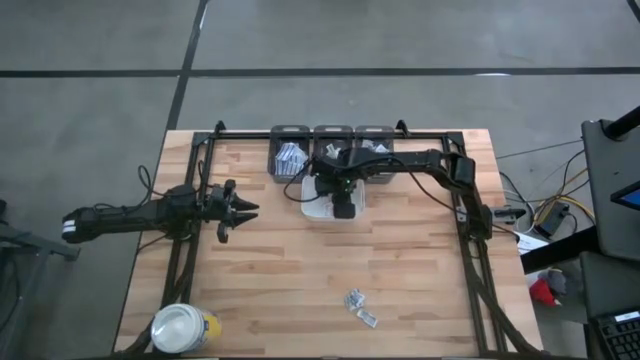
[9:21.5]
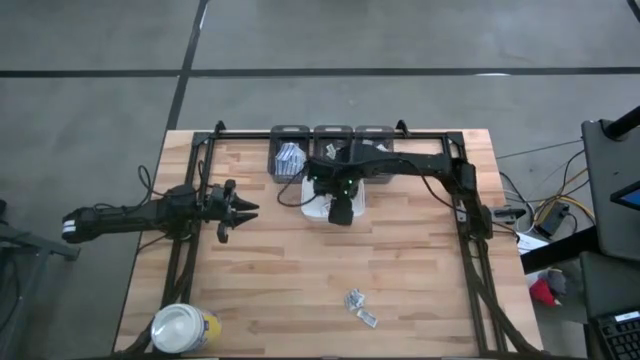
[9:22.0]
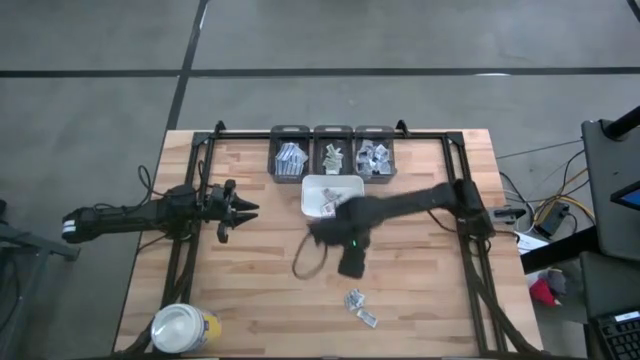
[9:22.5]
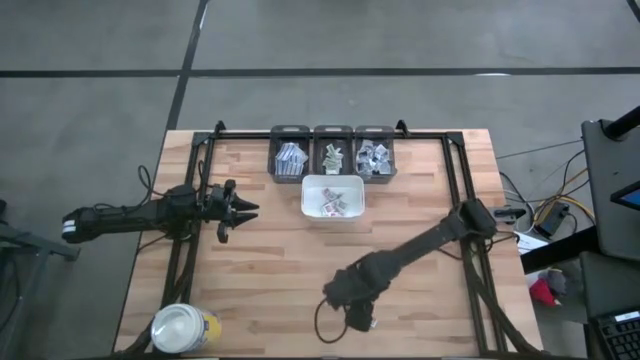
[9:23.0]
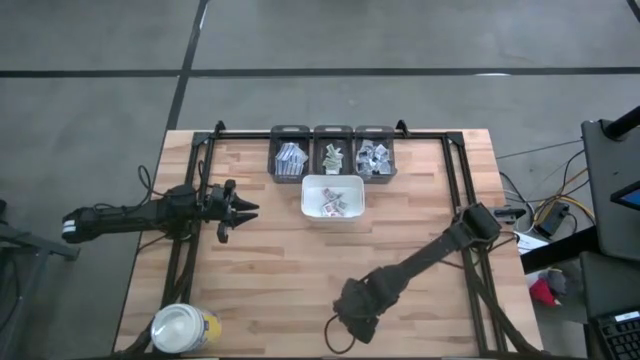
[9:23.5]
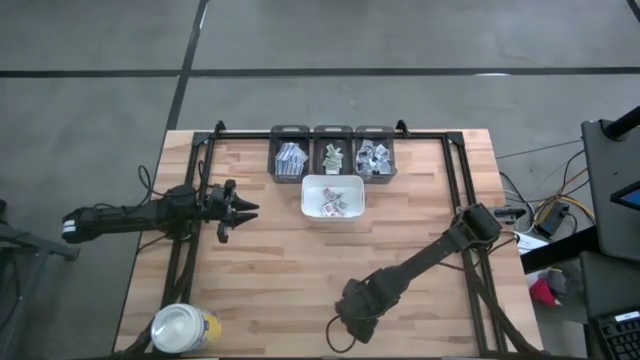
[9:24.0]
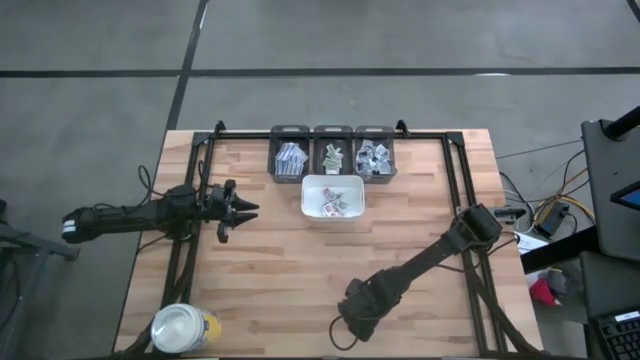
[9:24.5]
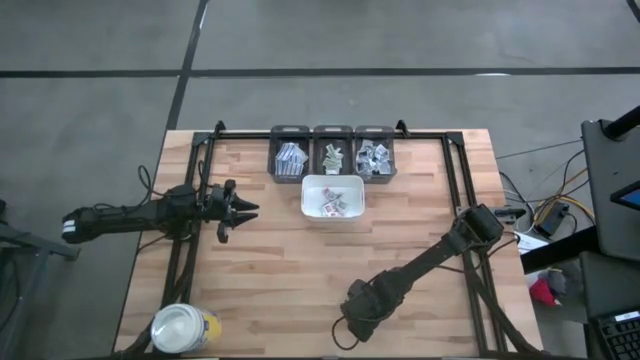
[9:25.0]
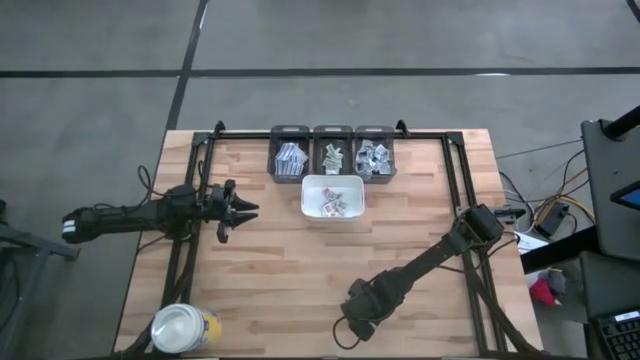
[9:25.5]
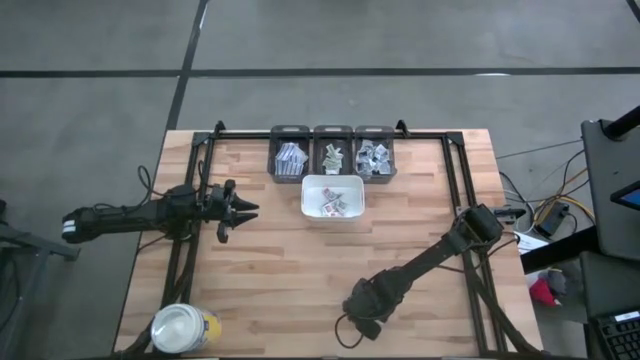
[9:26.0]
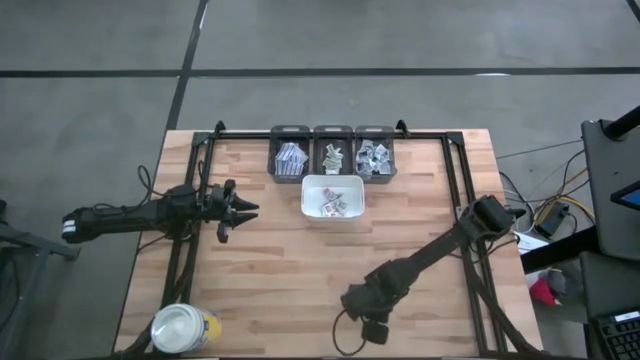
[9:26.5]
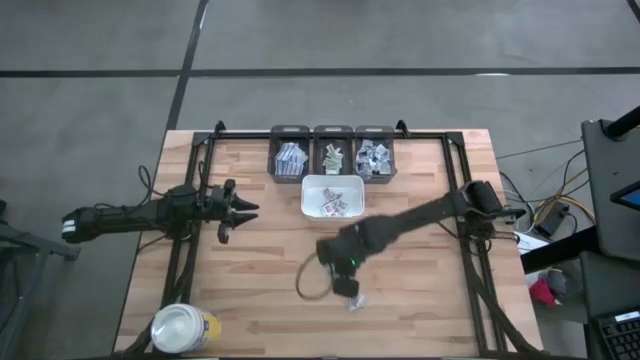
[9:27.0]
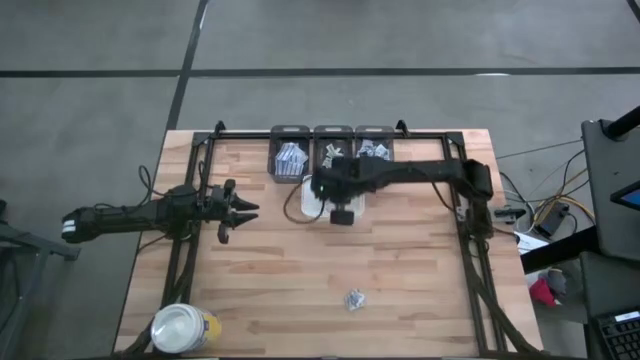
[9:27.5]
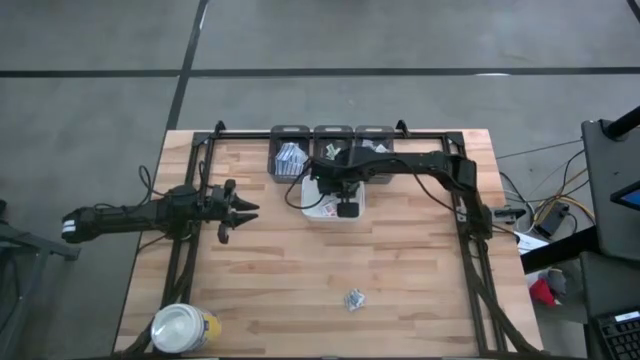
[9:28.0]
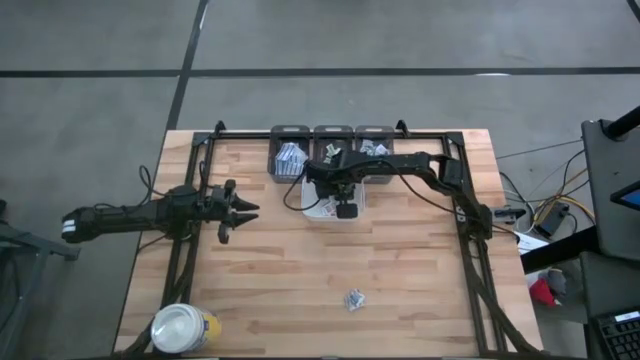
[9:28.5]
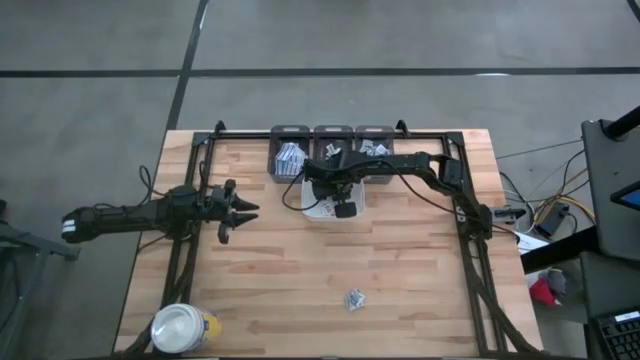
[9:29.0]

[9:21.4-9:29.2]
Task: Pick & Place First Aid Supplies
Put the orange ointment pack into the white bin

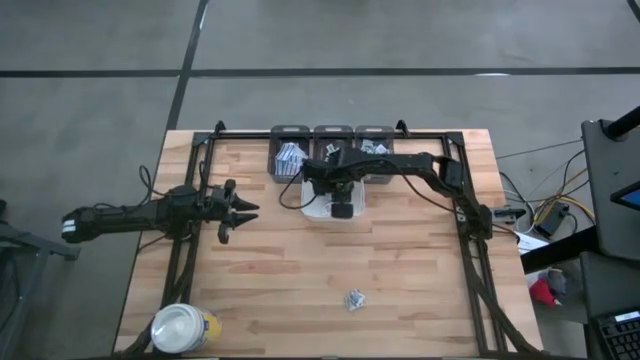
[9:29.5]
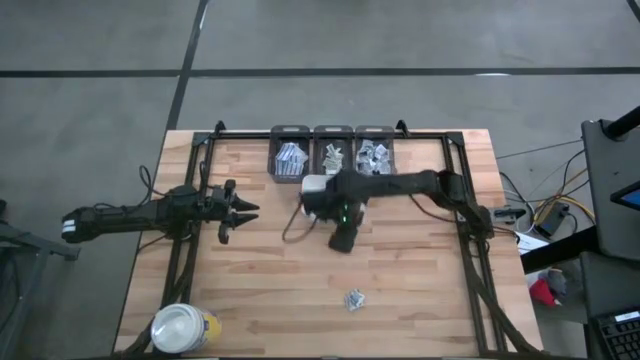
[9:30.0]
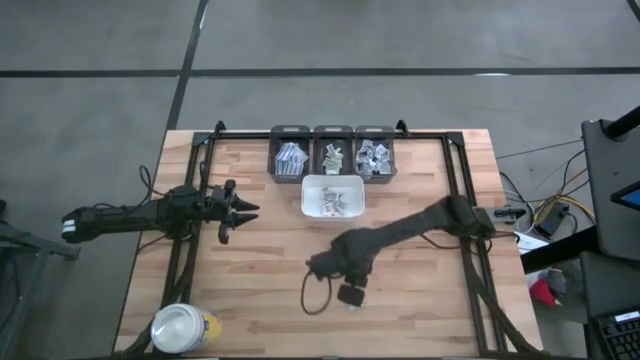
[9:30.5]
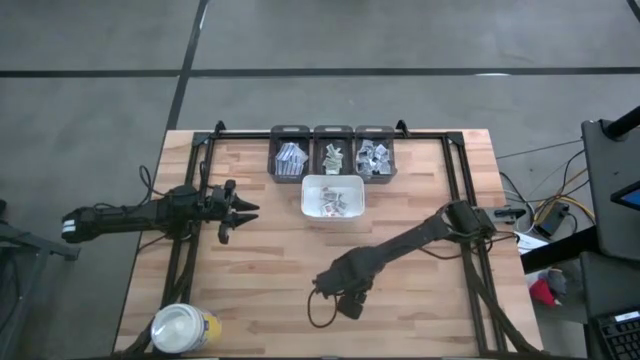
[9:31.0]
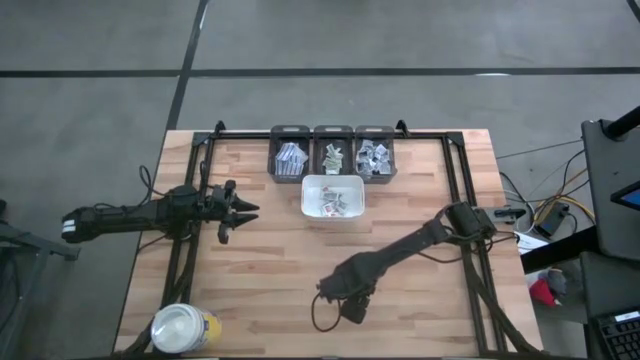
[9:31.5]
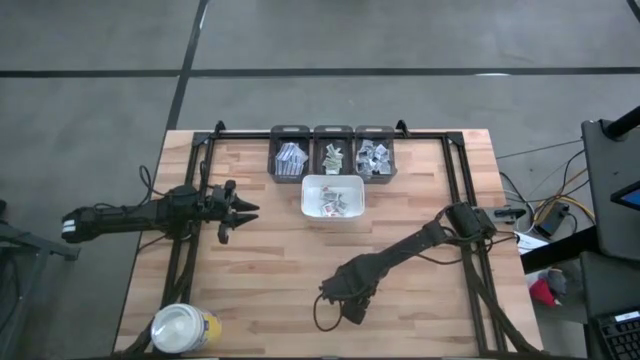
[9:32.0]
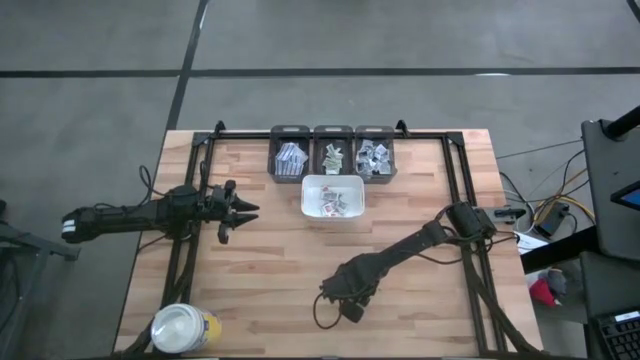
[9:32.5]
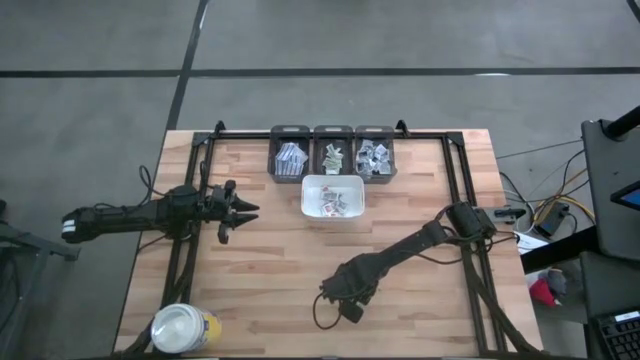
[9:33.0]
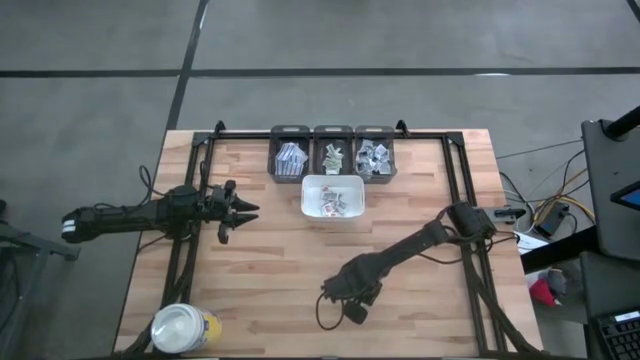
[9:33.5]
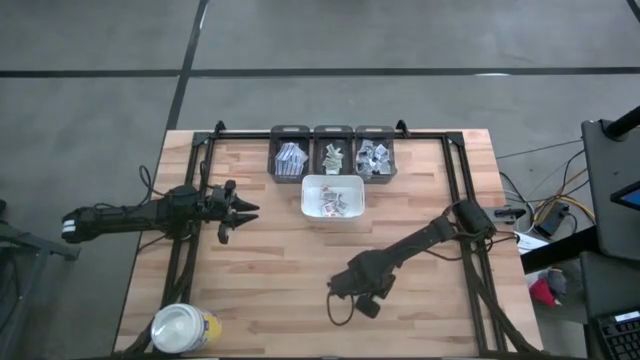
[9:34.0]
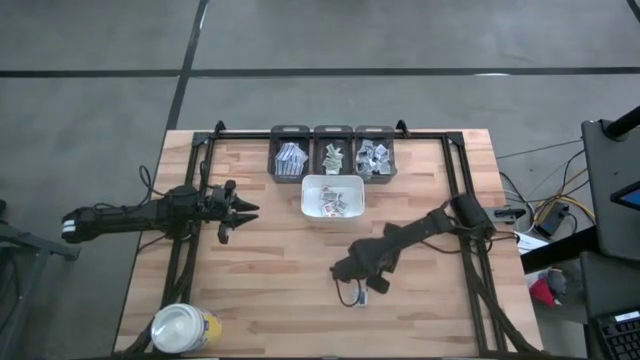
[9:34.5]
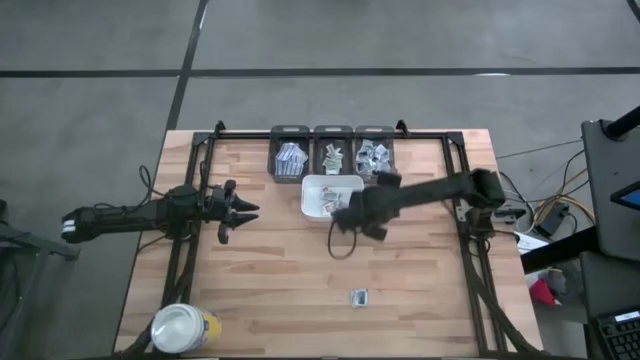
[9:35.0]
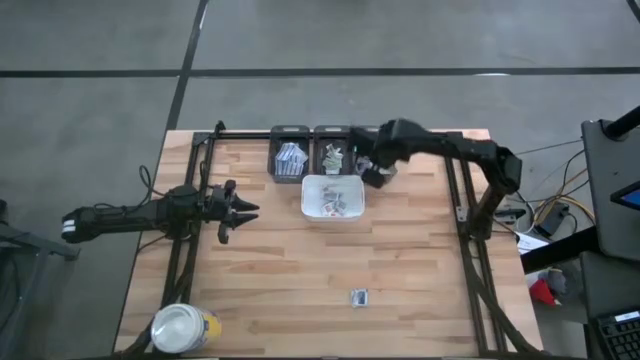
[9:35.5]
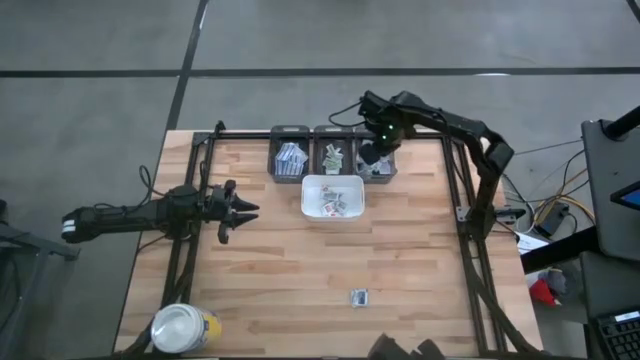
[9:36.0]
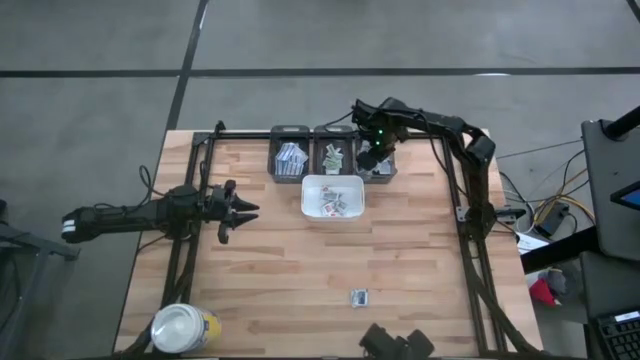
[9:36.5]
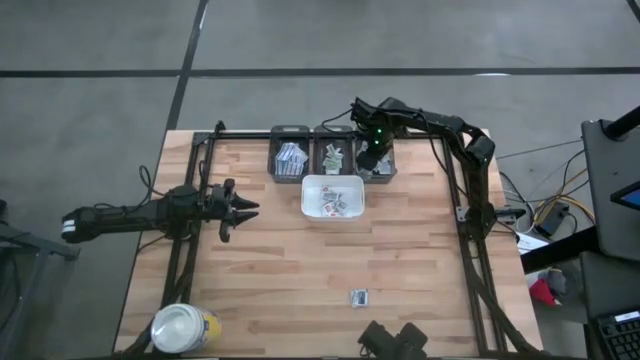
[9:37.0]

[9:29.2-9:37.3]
Put the white alcohol pad into the right black bin

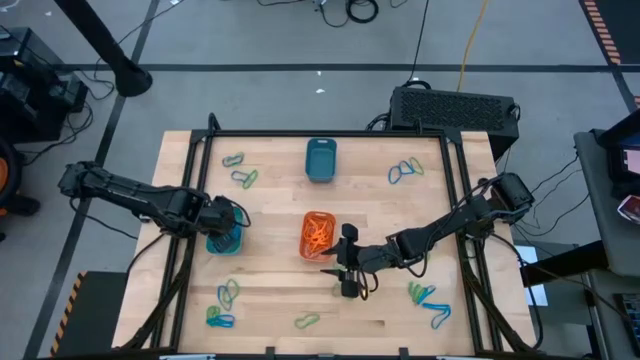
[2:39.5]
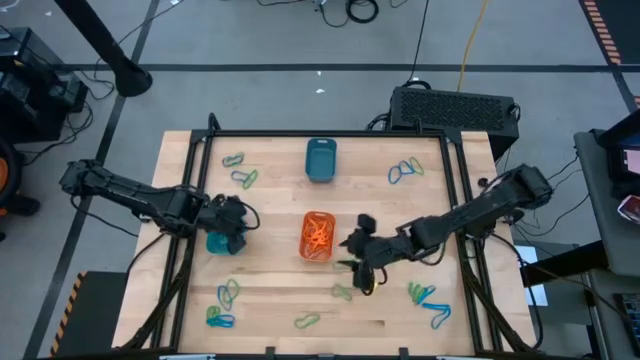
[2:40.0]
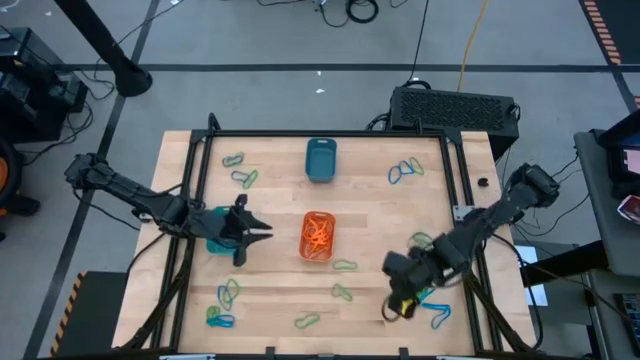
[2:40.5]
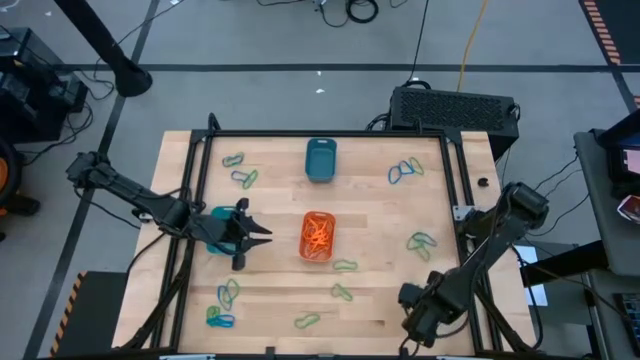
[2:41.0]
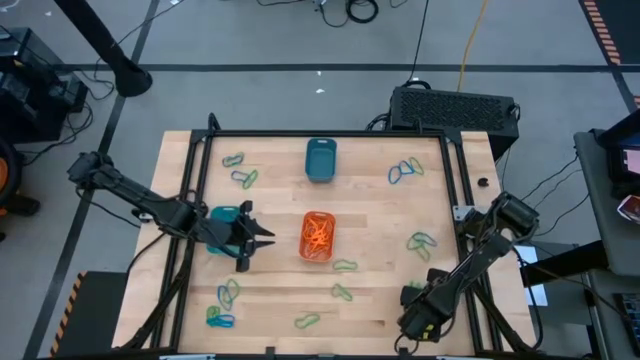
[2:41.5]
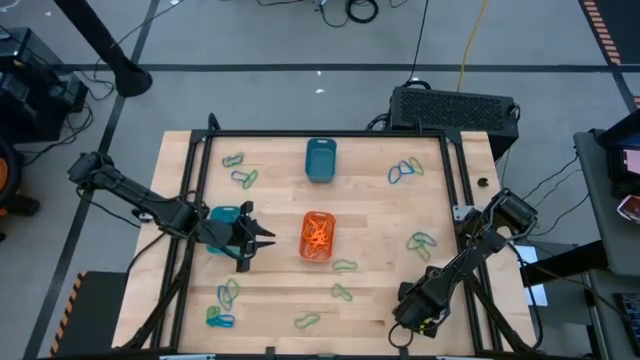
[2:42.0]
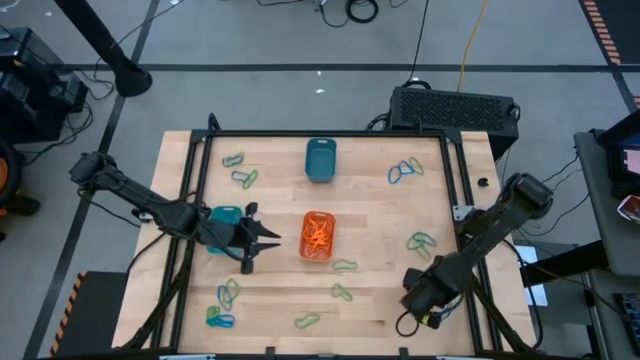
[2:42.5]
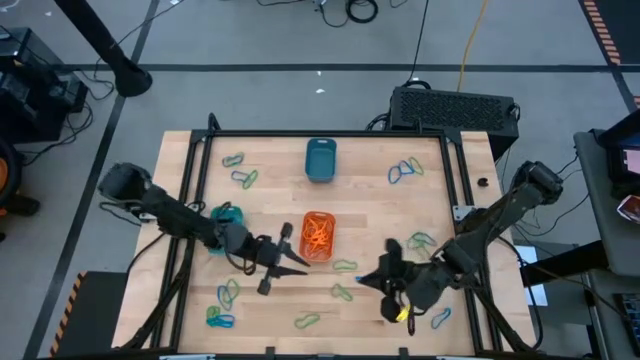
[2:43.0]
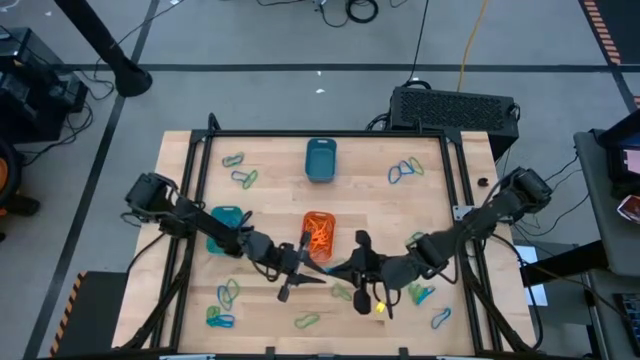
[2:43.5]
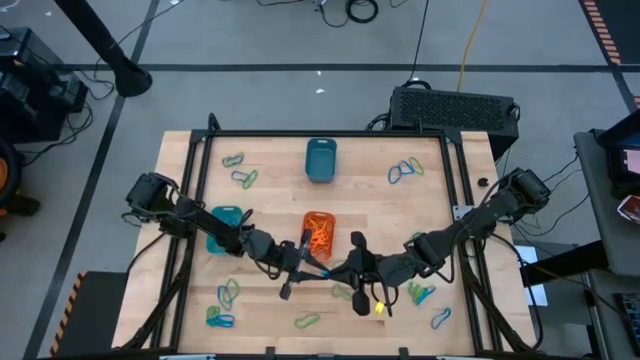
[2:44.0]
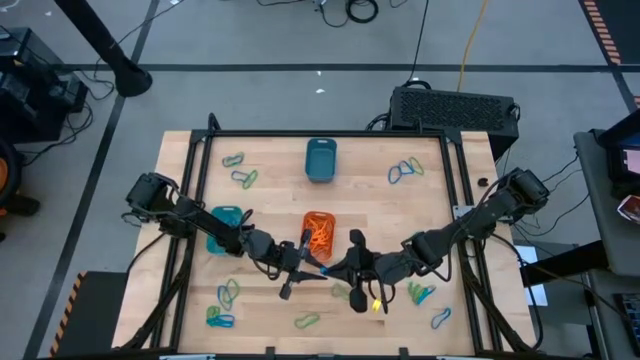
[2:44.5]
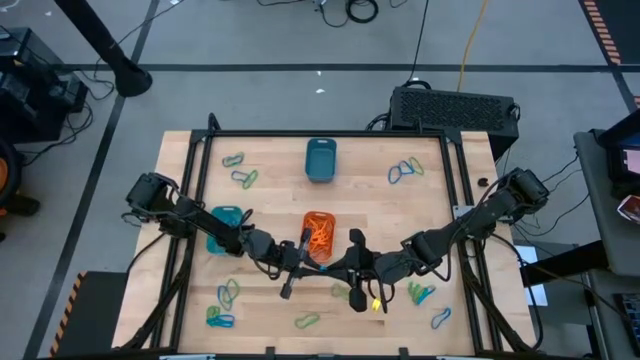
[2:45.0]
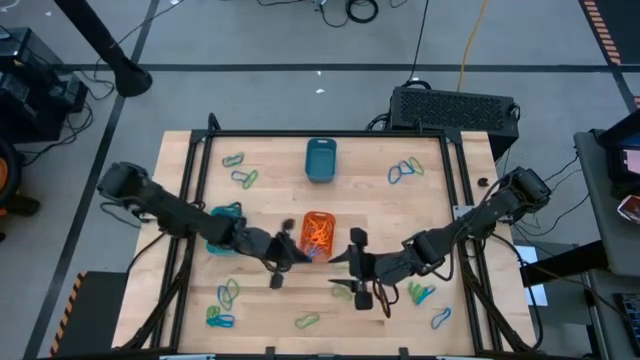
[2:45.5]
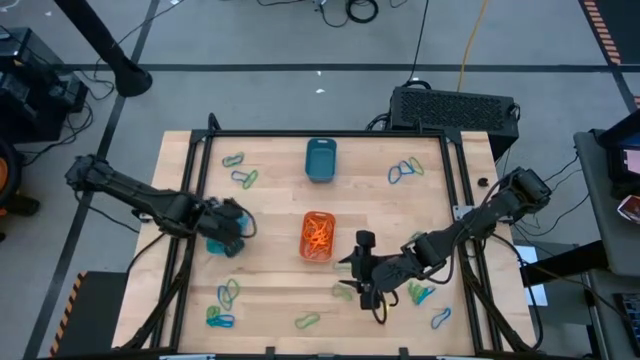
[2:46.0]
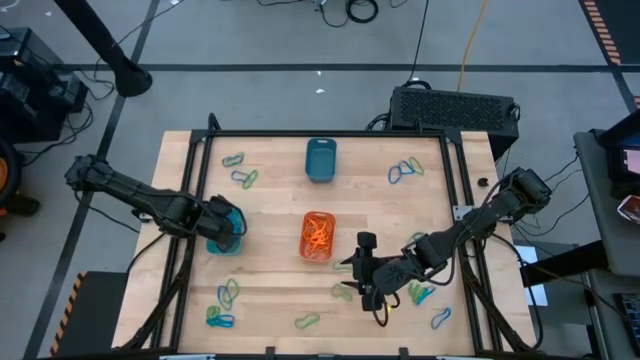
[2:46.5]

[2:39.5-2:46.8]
Task: Sort rubber bands into baskets
Put the blue rubber band into the green bin
